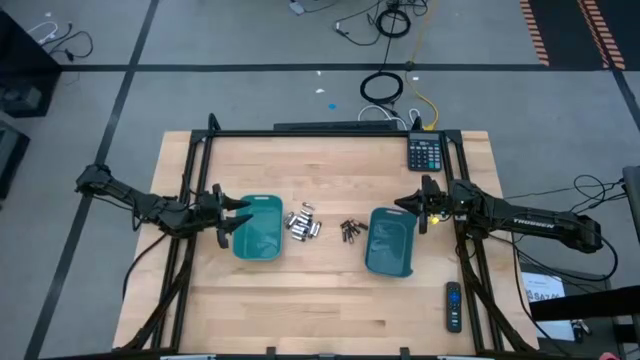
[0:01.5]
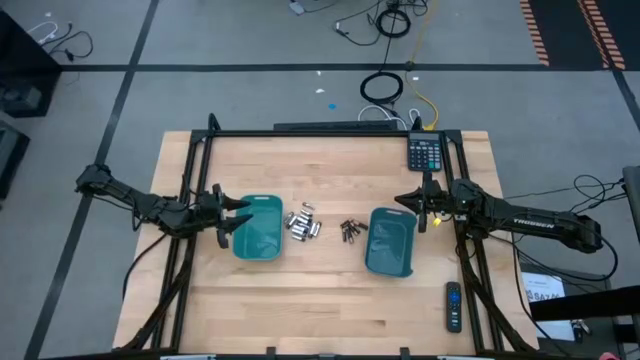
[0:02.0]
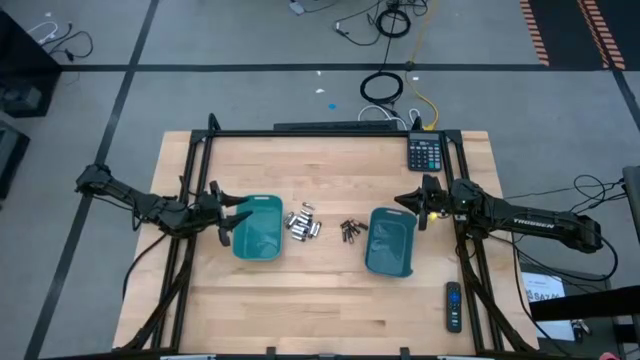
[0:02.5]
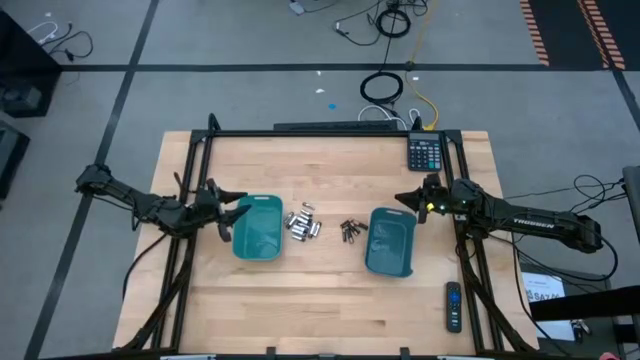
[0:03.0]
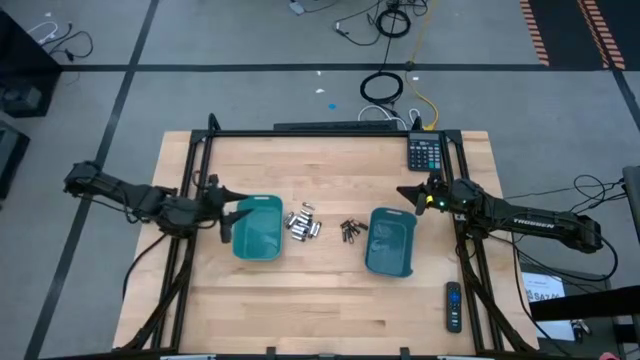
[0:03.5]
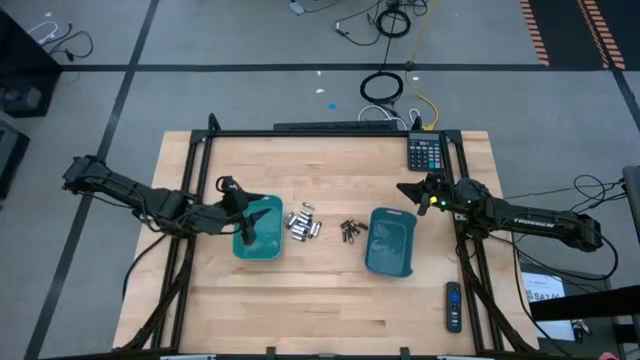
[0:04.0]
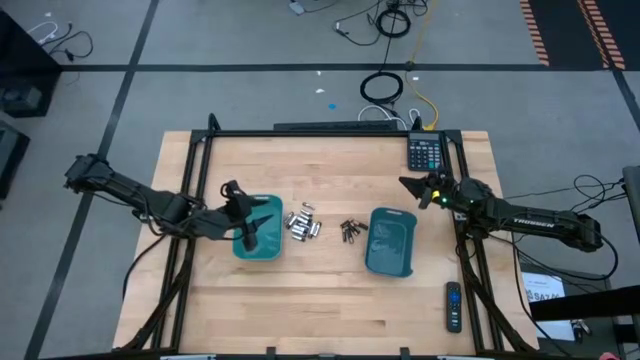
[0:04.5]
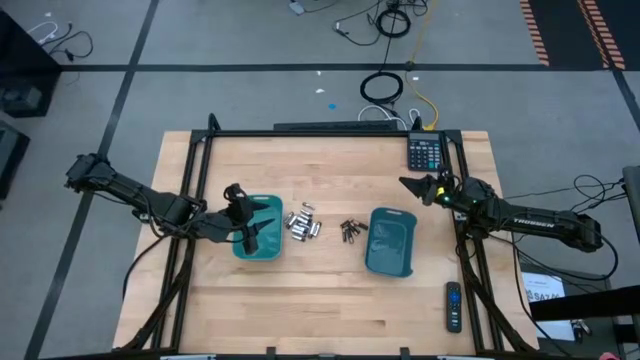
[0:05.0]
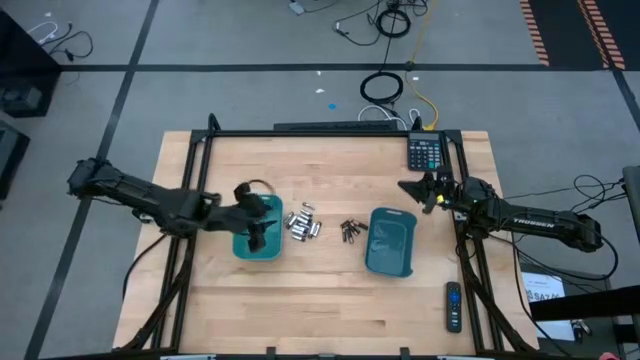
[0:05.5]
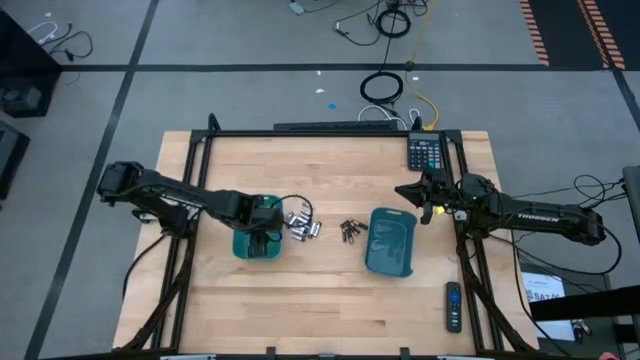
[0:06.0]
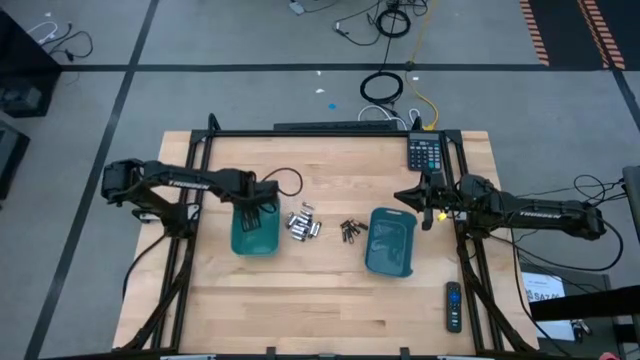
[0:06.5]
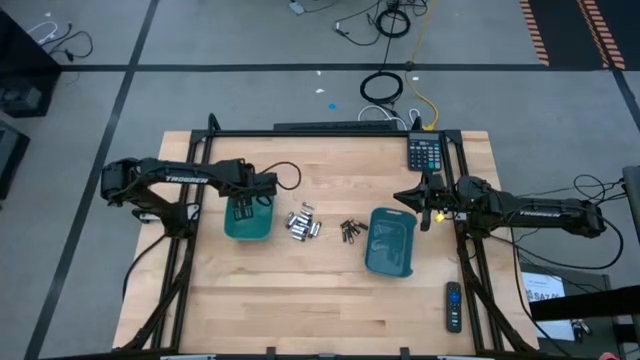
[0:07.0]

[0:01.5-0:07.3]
Task: Sort batteries
Adjust the green bin

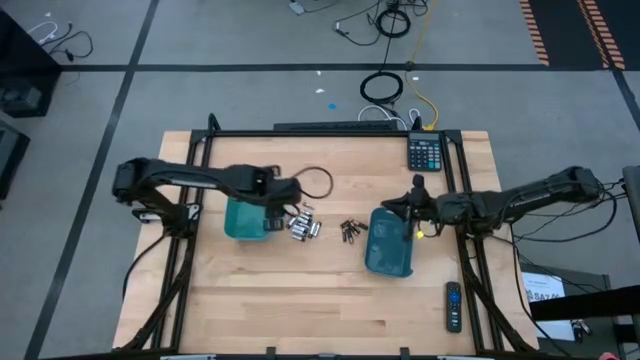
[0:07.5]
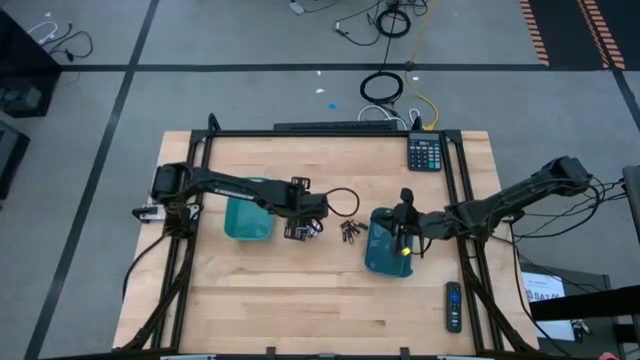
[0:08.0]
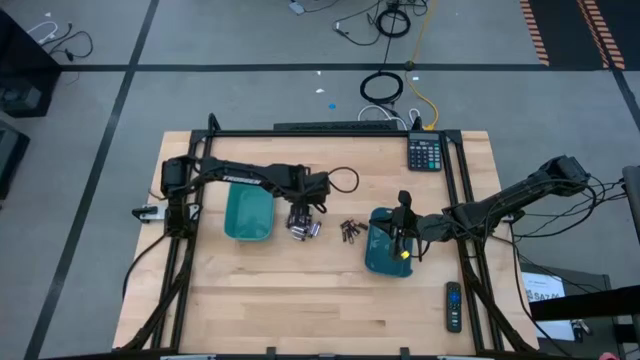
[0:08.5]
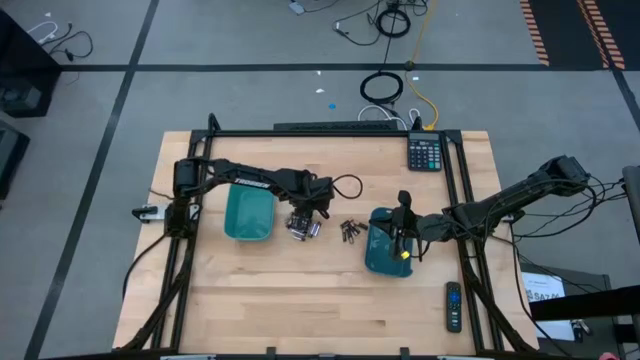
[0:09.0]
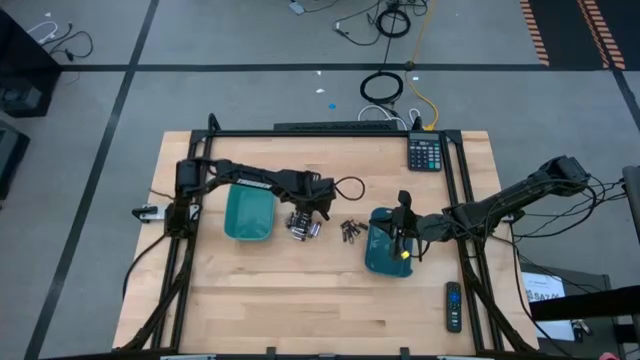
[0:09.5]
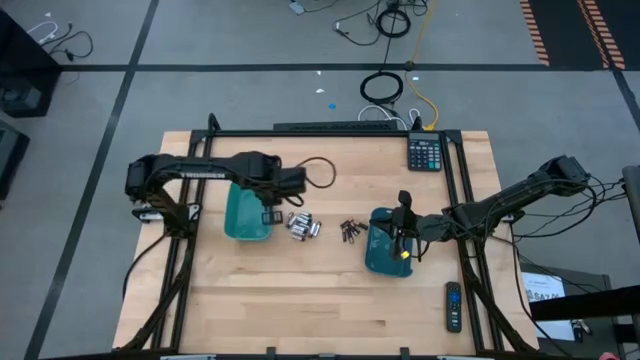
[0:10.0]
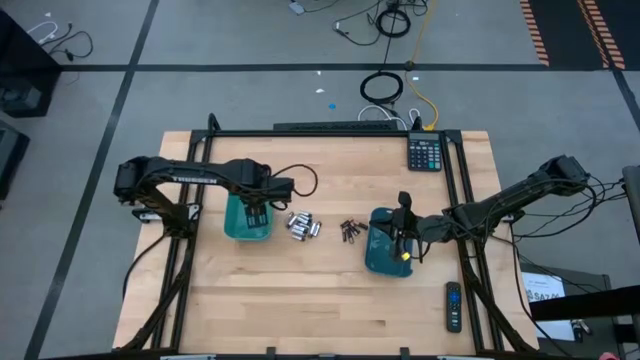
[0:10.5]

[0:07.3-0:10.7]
Put the silver battery into the green bin

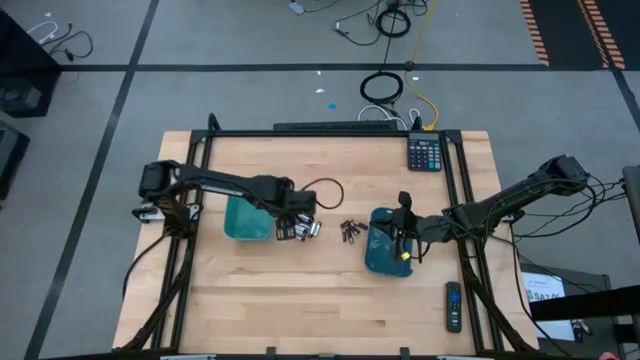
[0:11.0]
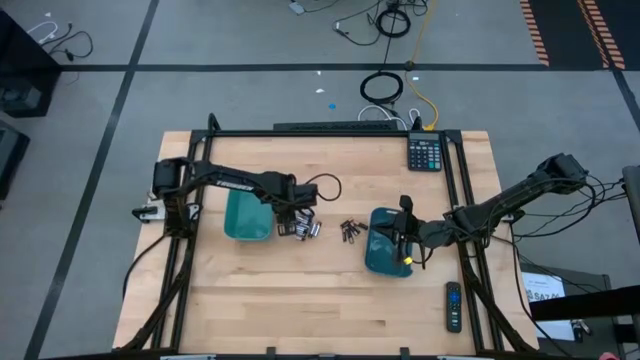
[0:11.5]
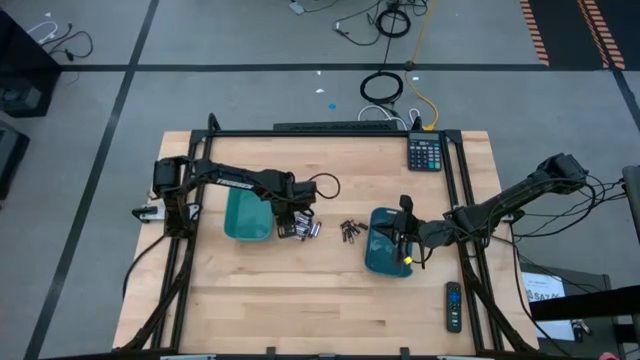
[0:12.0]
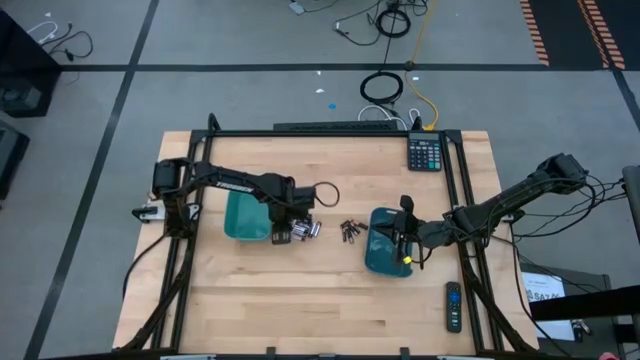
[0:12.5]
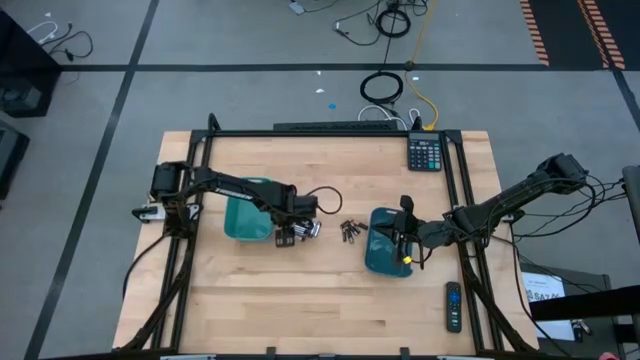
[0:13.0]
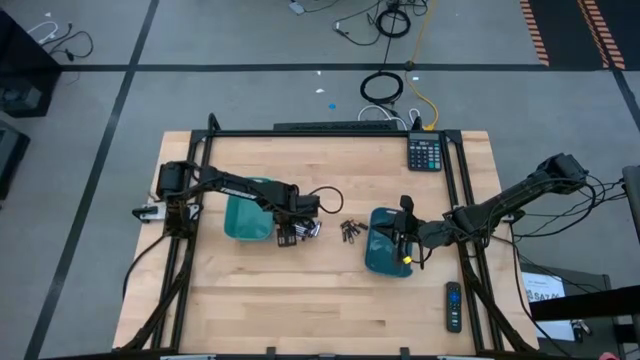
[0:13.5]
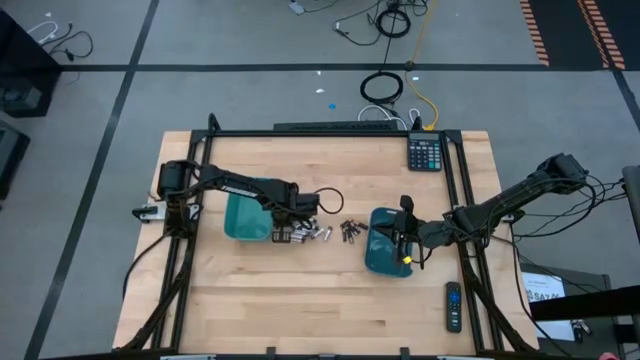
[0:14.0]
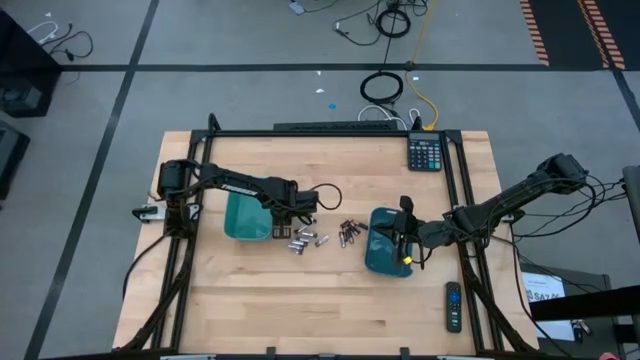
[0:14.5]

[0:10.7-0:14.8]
Put the silver battery into the green bin

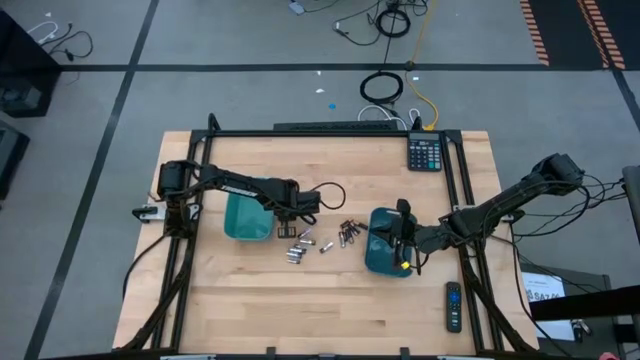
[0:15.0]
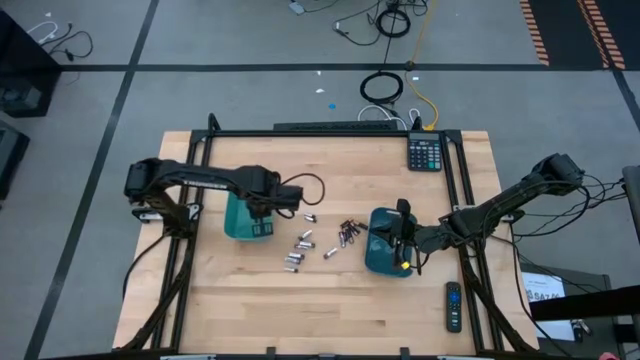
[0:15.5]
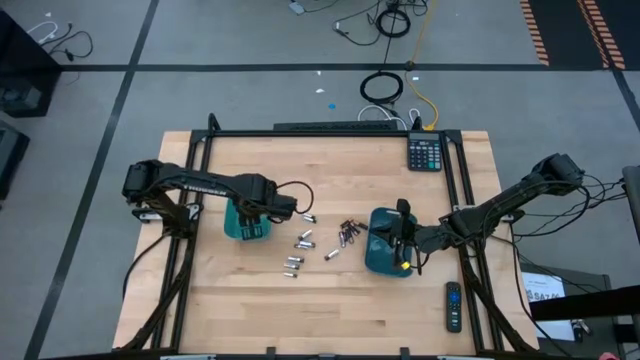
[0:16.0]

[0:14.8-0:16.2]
Put the silver battery into the green bin

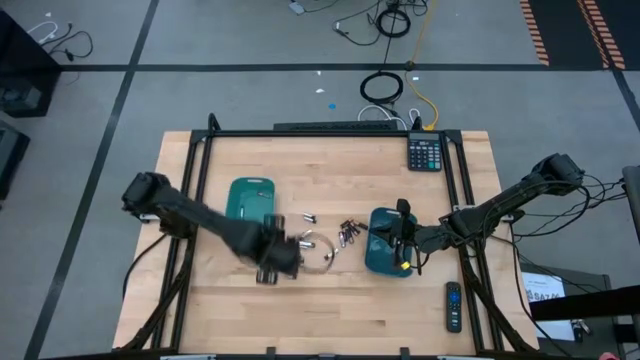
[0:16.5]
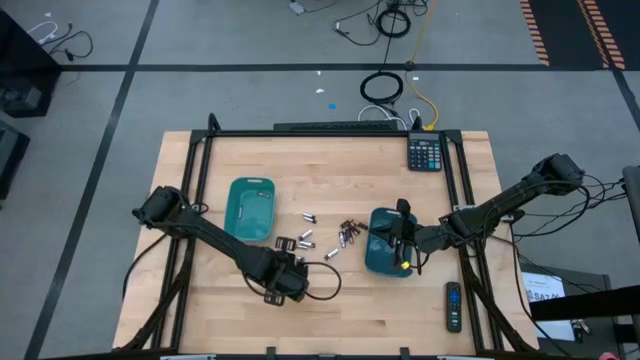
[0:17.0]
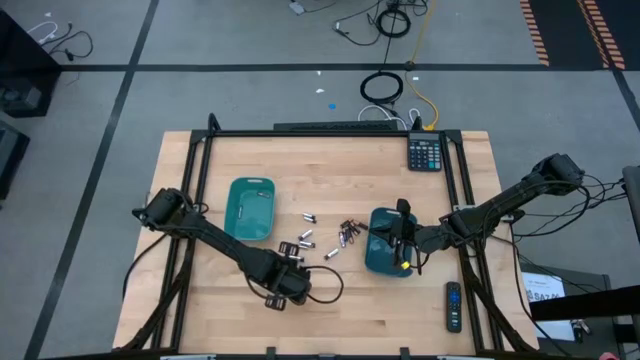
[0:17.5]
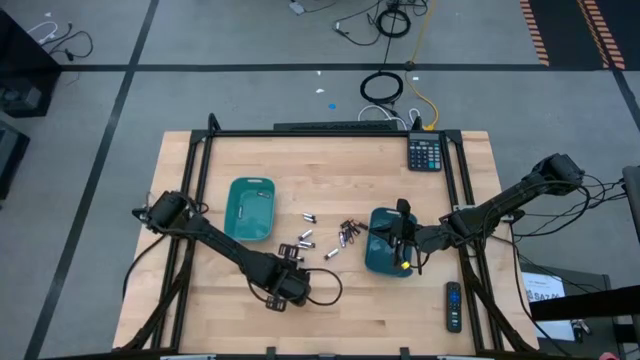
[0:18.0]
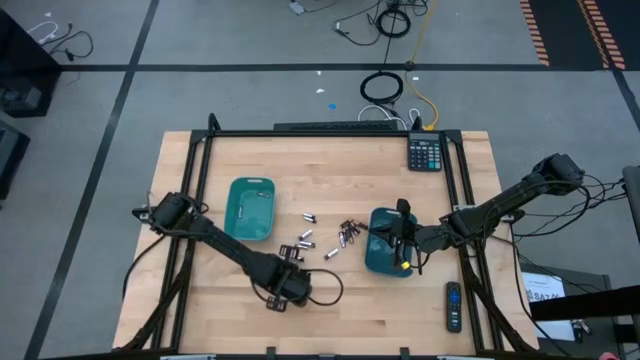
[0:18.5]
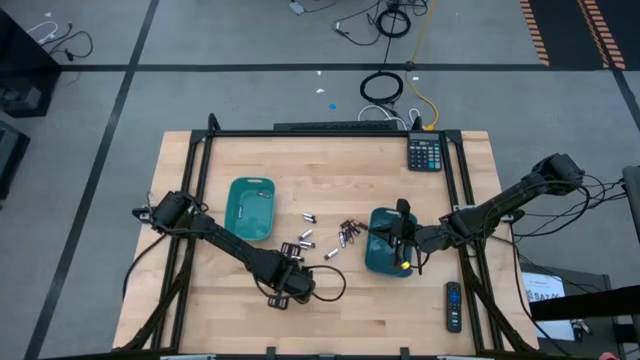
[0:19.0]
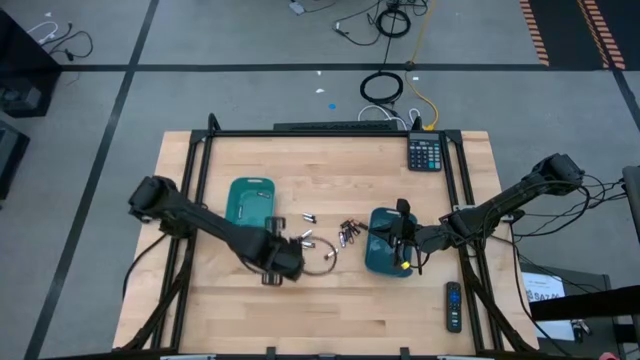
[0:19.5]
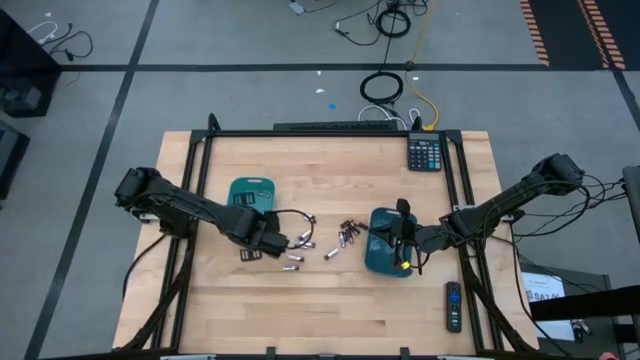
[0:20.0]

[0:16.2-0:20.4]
Put the silver battery into the green bin

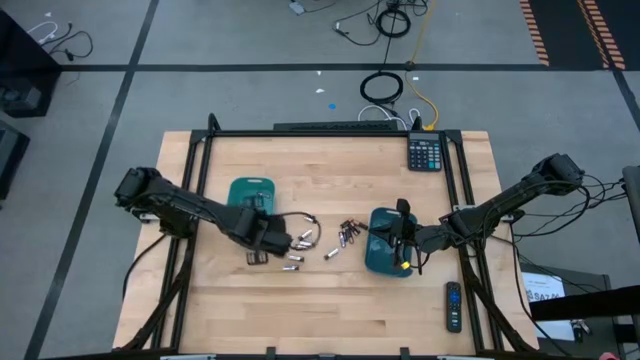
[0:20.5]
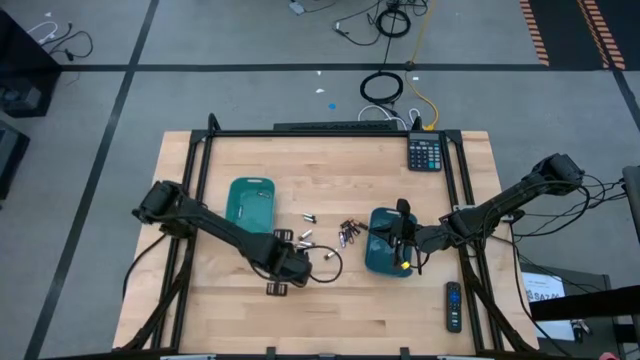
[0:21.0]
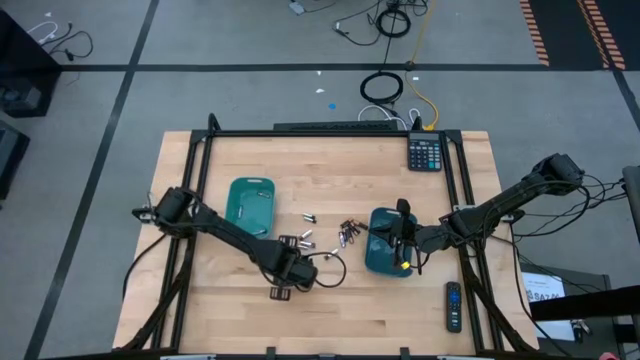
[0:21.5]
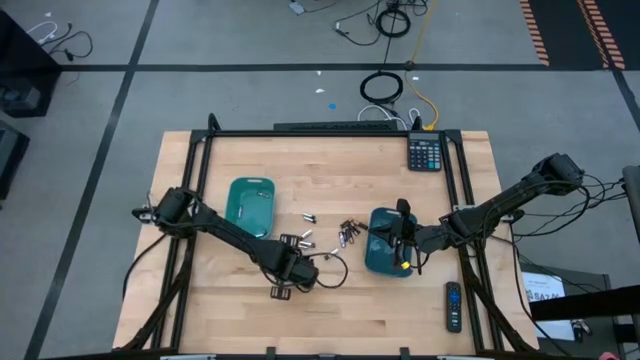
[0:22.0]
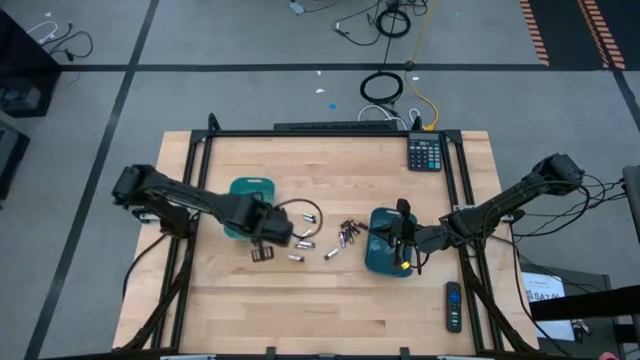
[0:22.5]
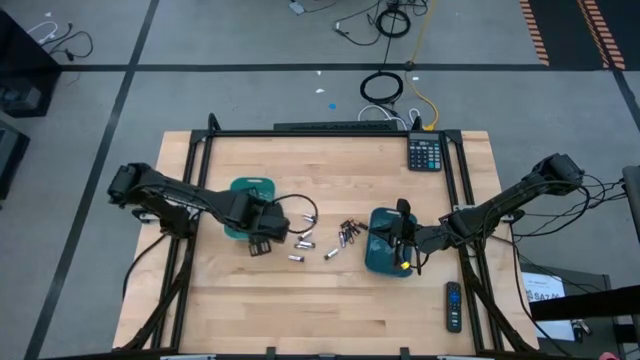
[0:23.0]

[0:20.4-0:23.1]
Put the silver battery into the green bin
